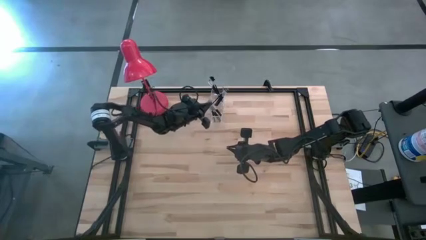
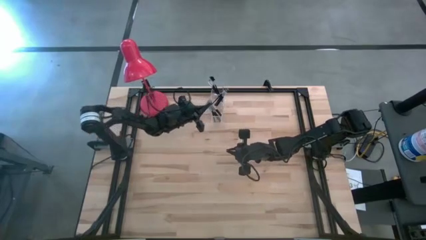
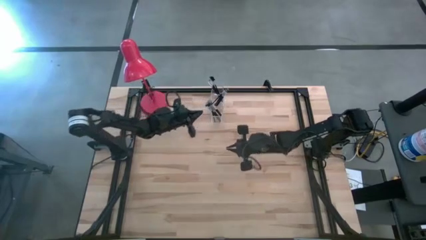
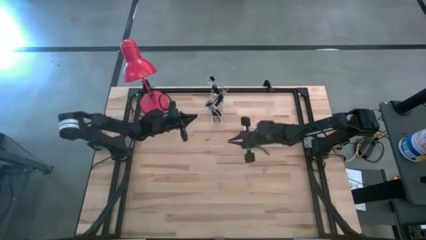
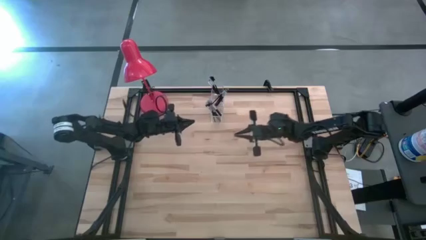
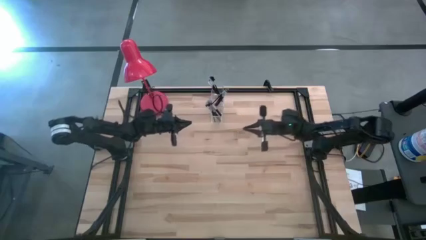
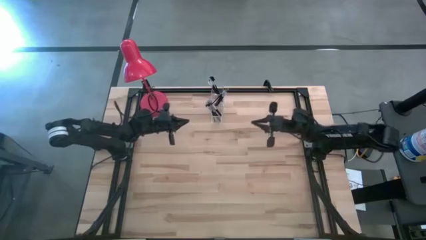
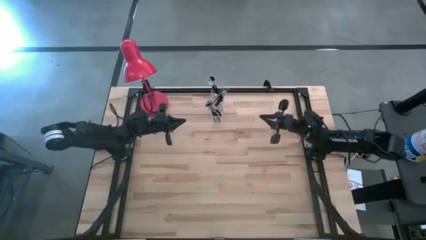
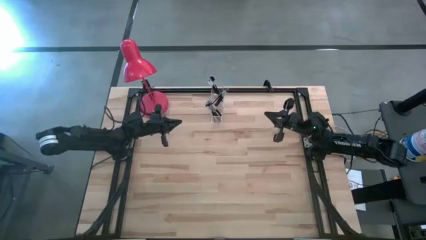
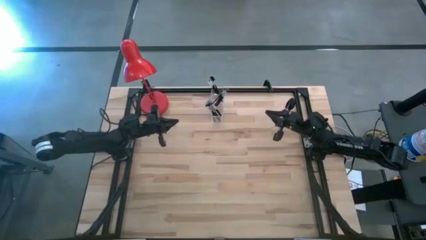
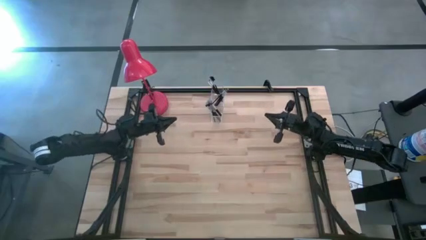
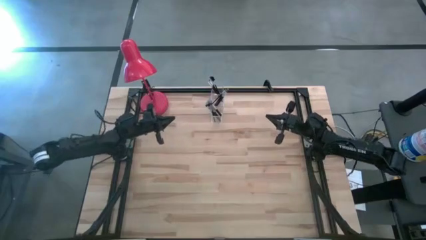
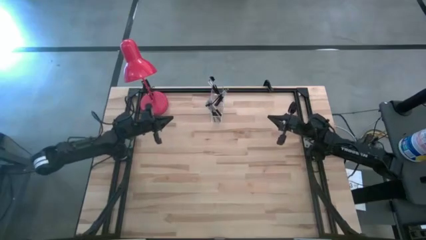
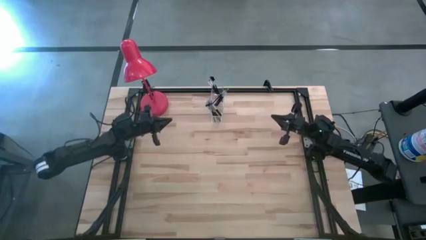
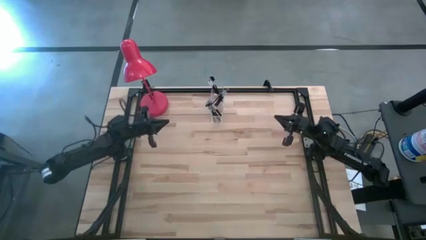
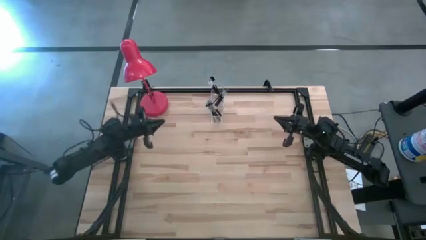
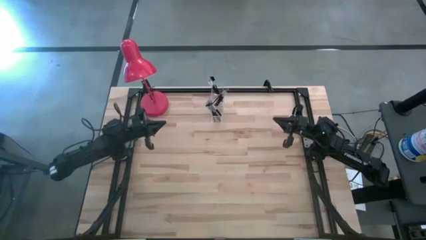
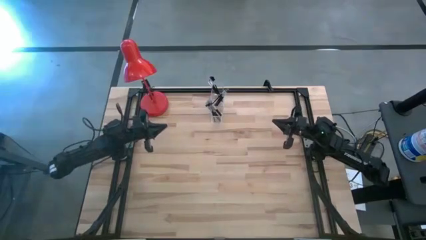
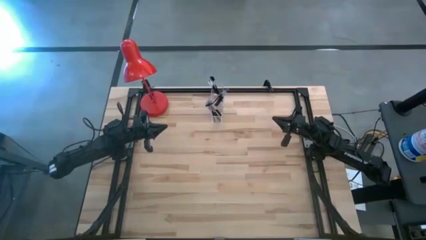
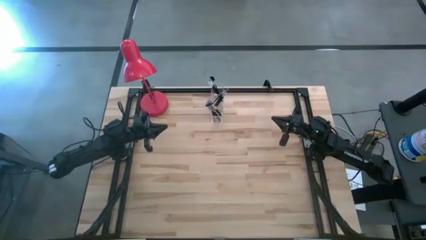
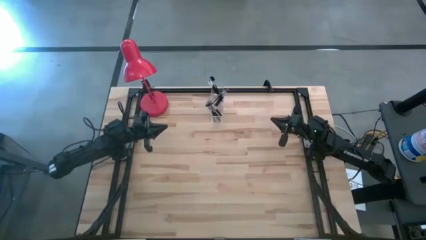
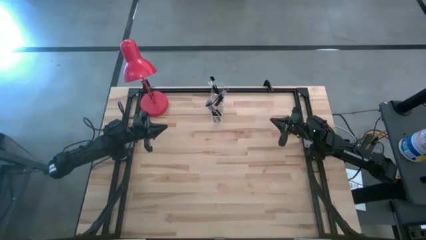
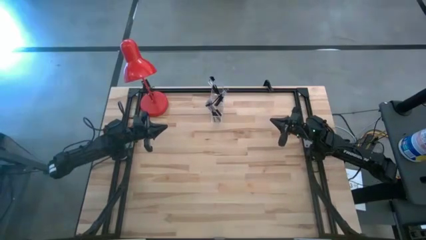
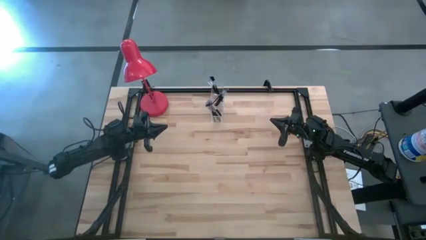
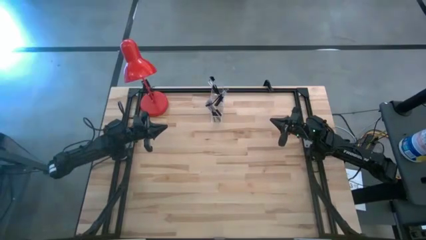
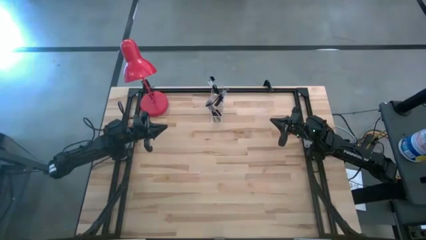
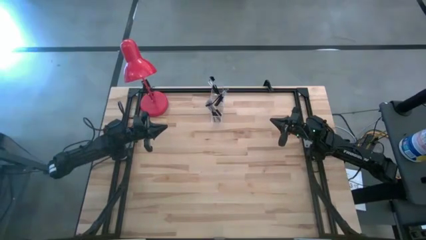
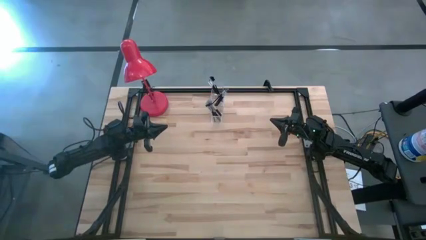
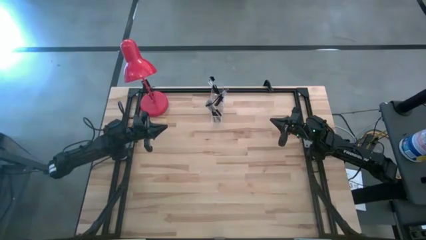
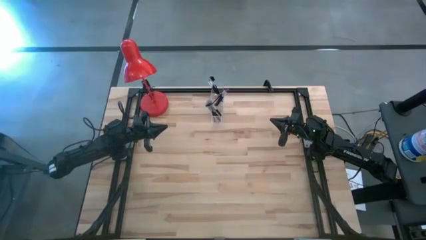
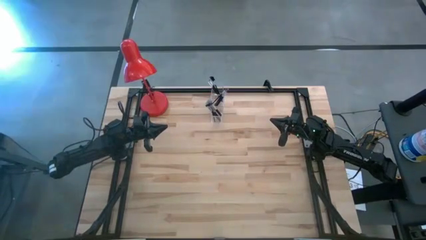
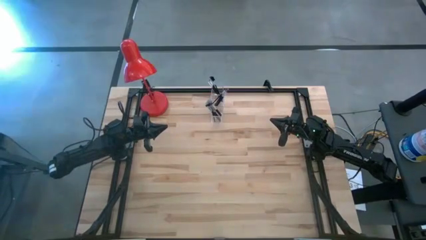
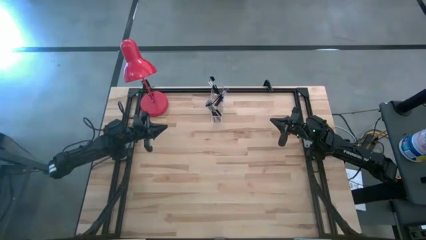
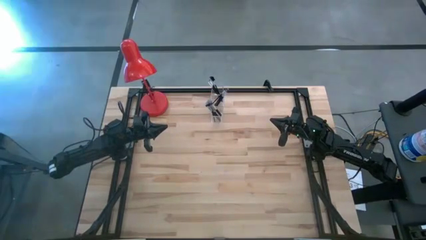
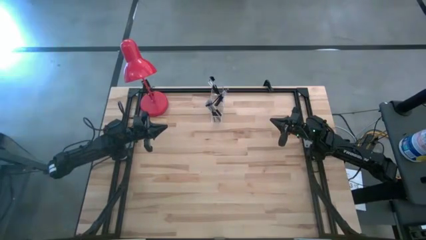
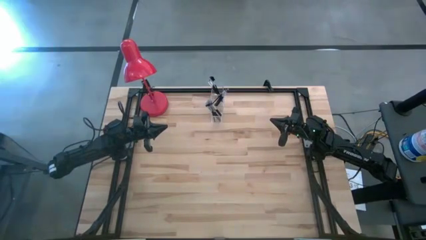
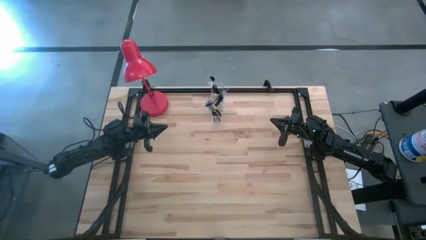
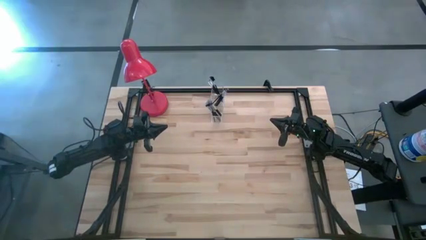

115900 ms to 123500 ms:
Task: Put items in baskets/containers
Return to Home Position

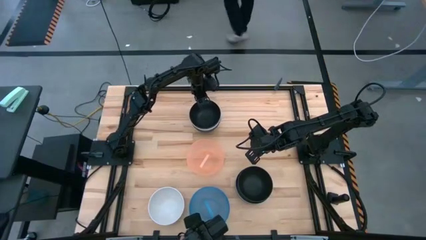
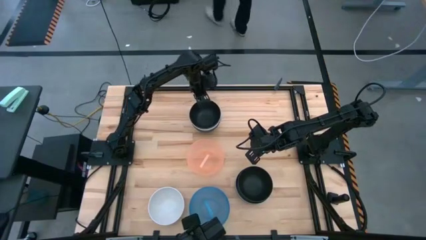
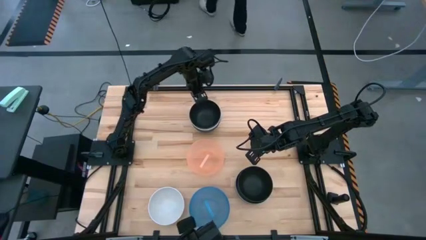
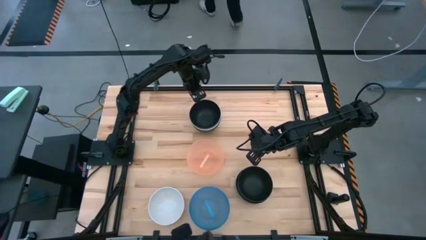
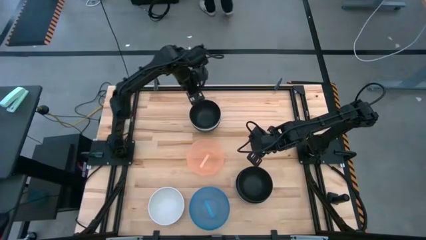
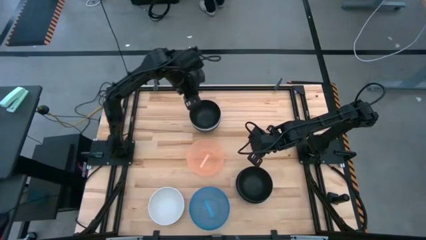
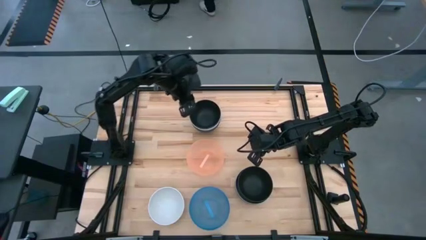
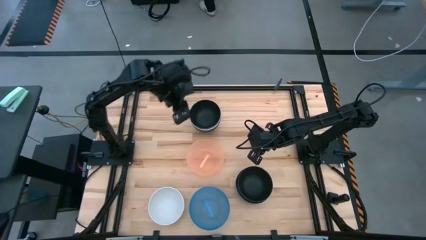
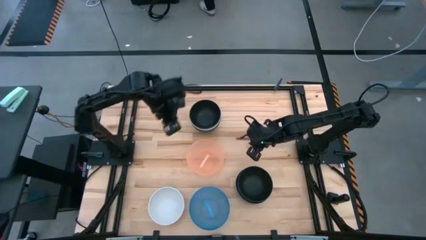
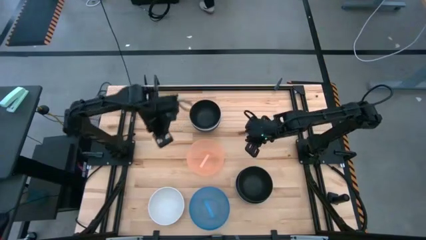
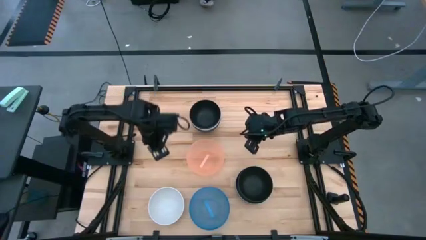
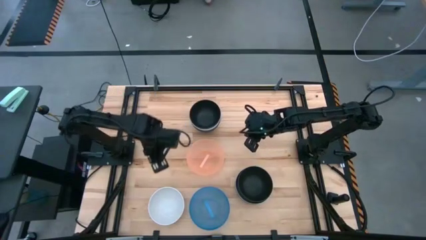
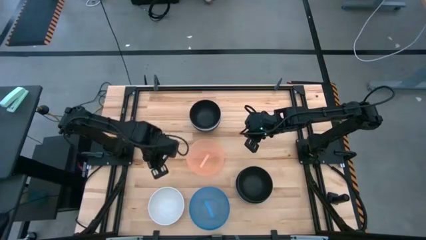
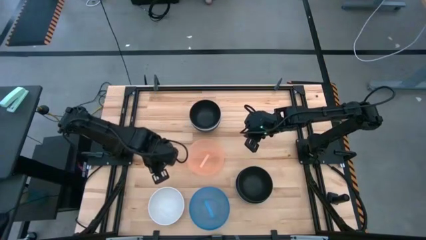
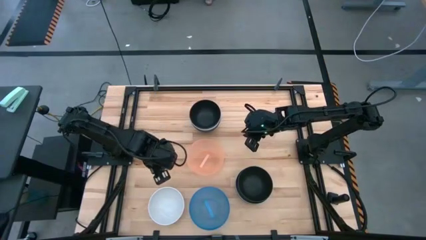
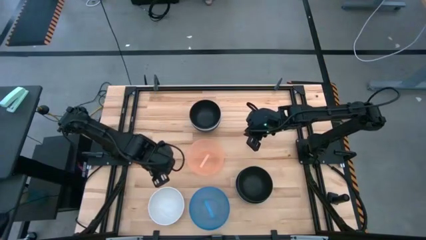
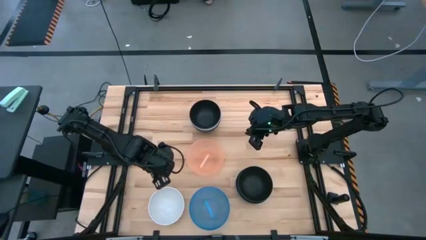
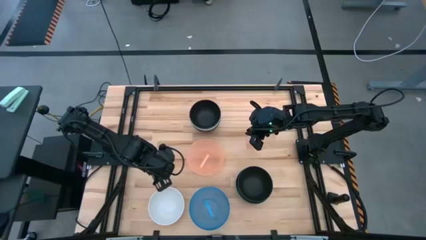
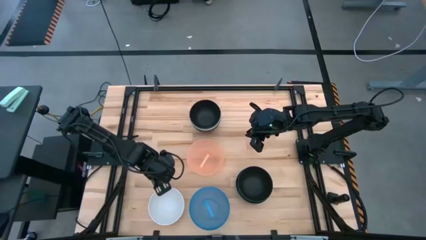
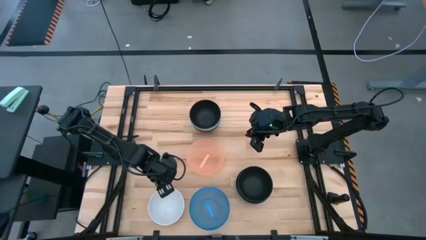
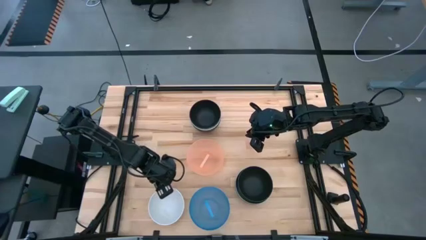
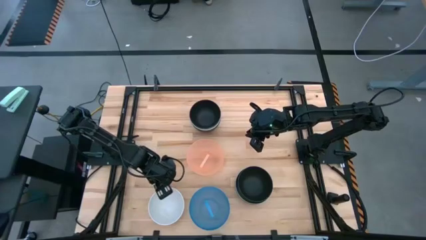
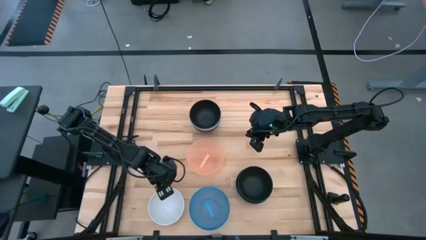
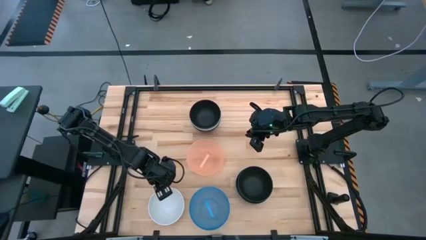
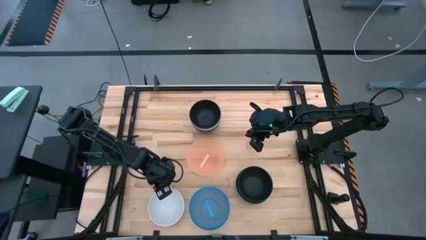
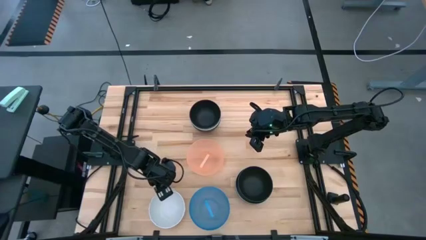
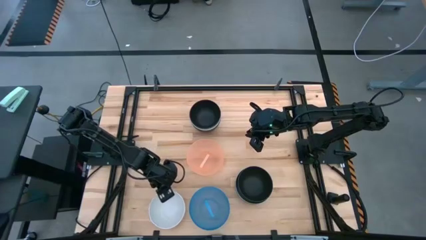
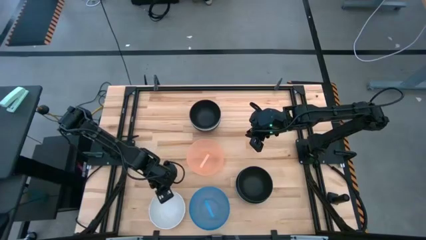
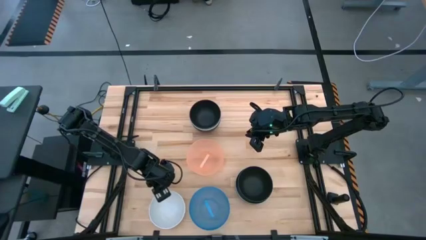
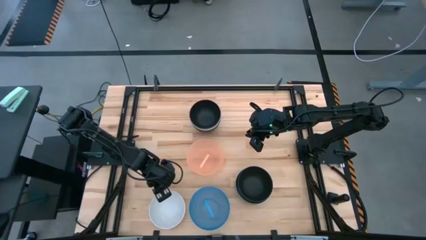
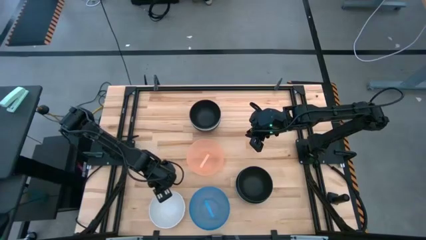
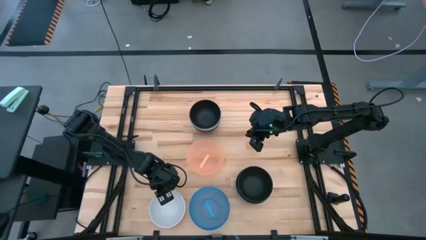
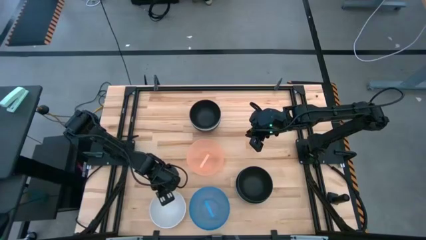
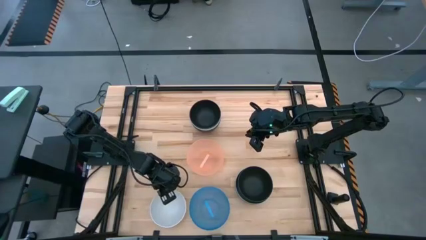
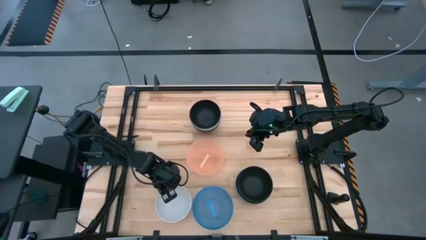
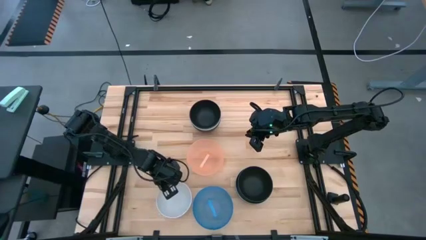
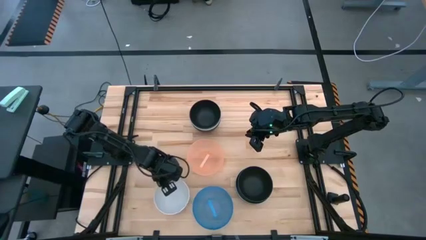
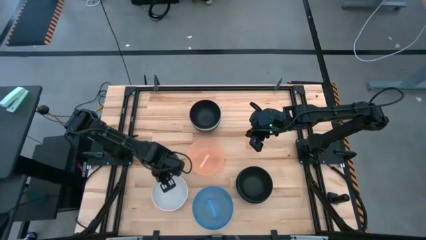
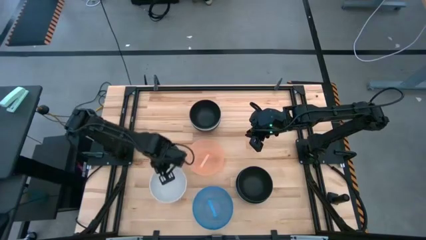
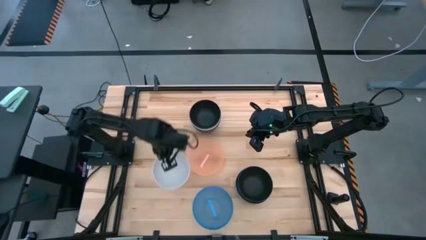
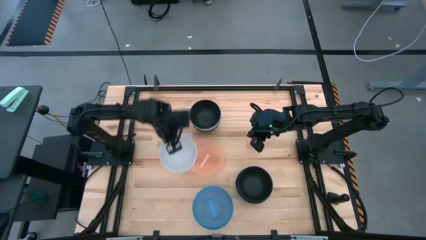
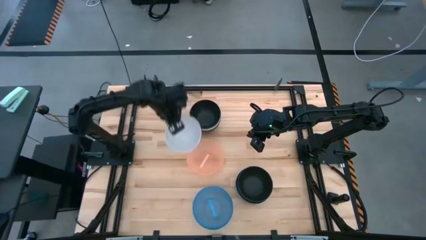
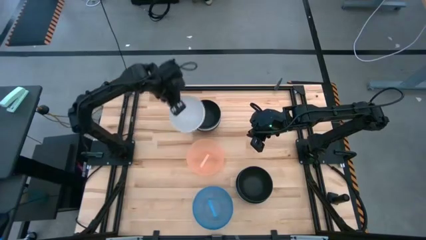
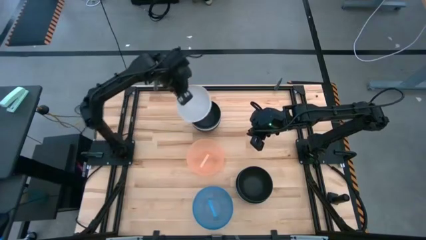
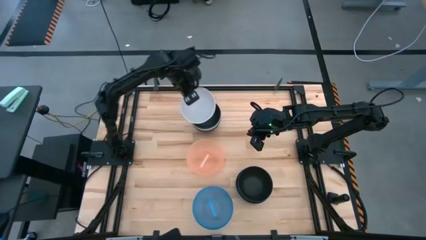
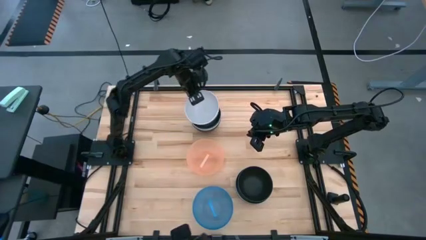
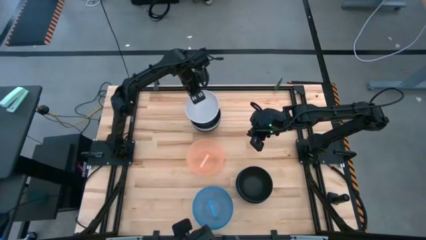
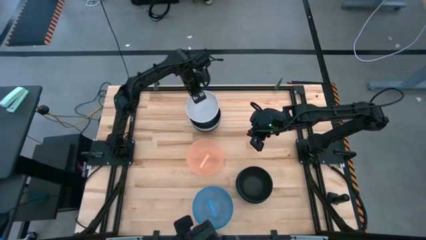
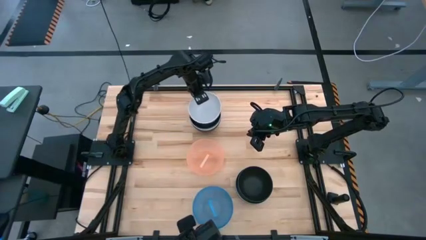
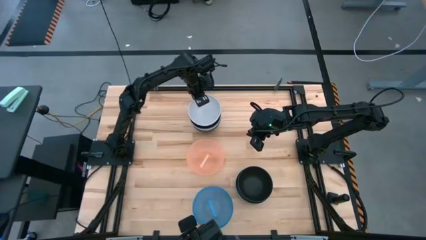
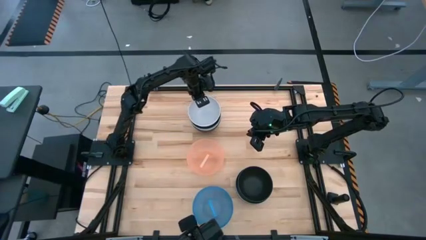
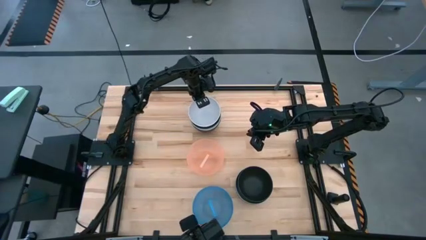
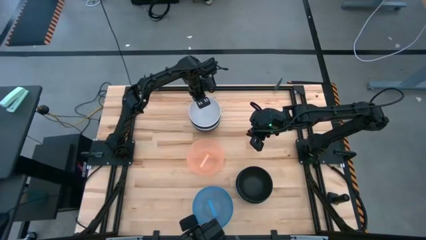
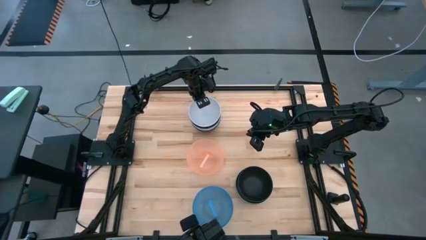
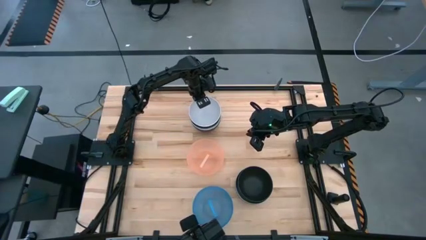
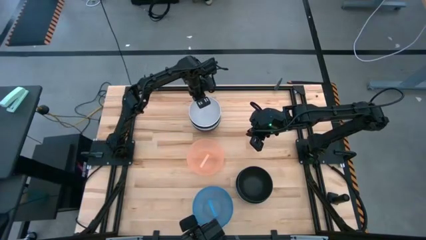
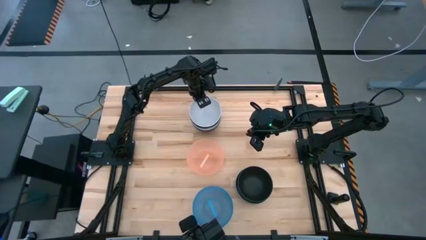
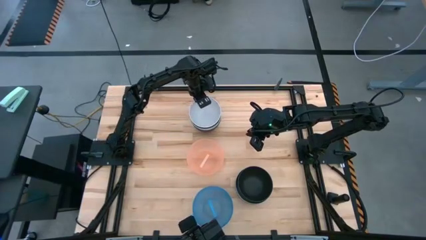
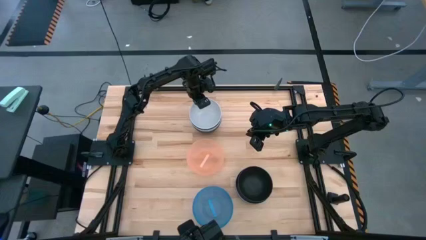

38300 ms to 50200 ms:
Task: Nest bowls inside each other
Stack the white bowl on top of the top stacked bowls
